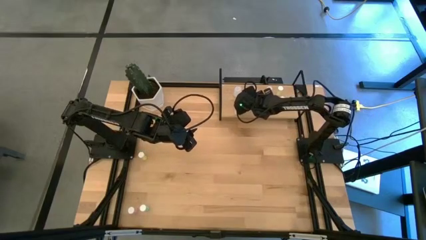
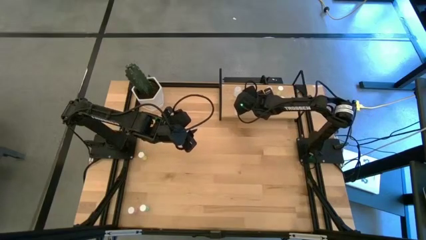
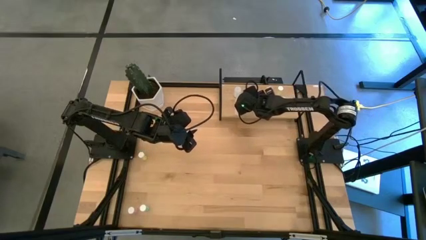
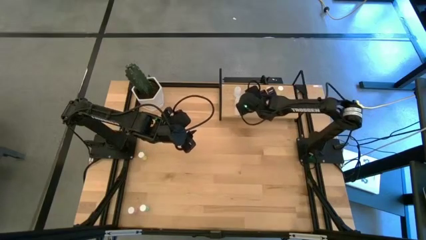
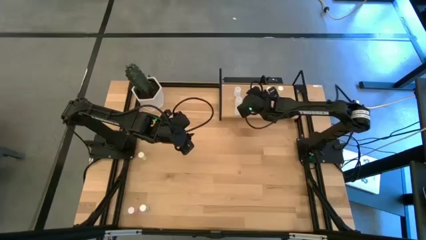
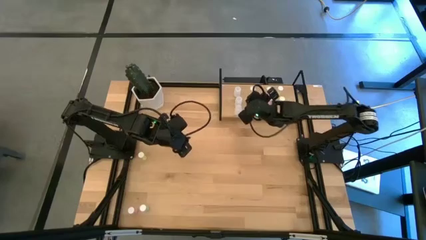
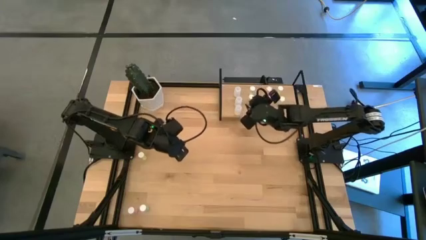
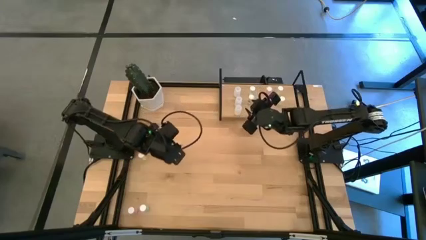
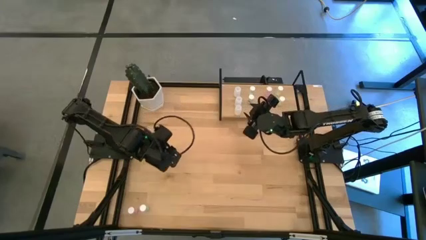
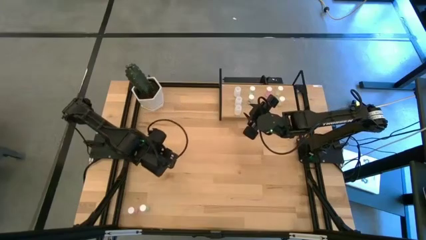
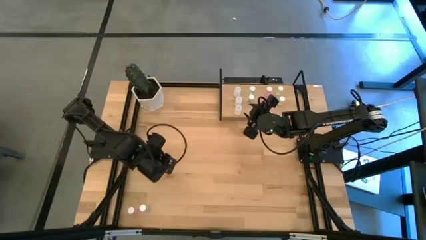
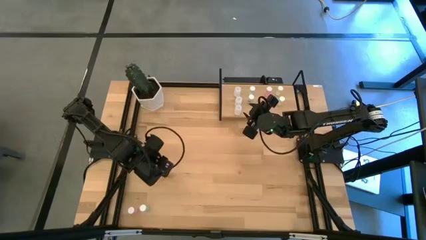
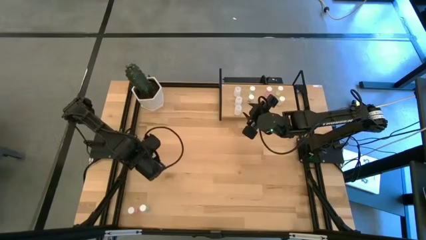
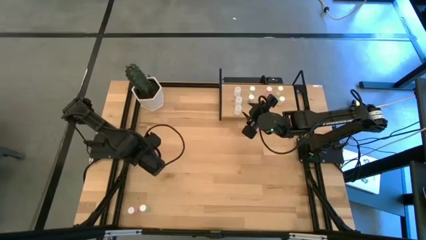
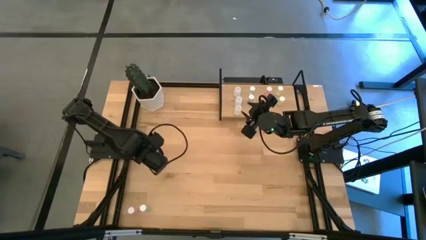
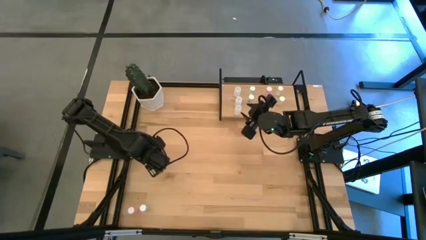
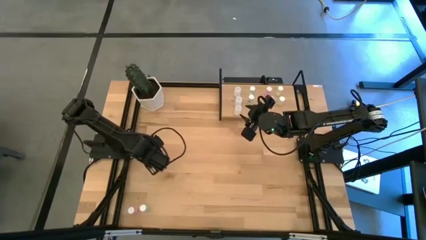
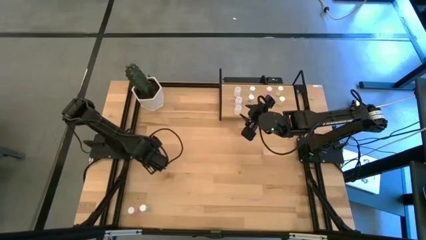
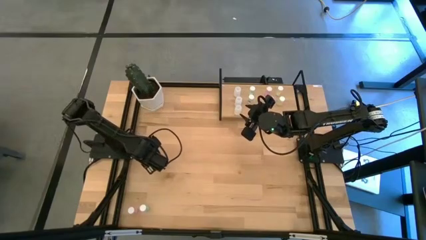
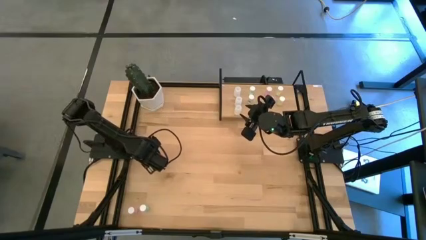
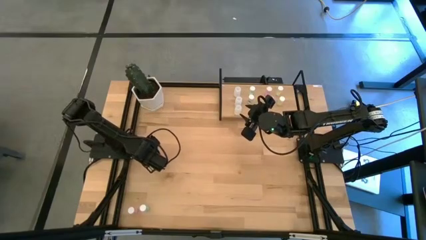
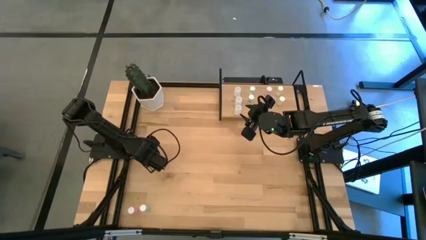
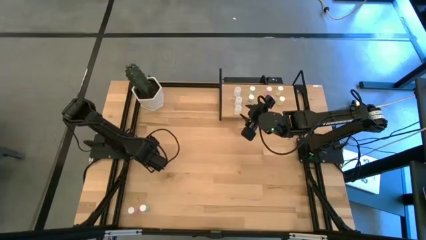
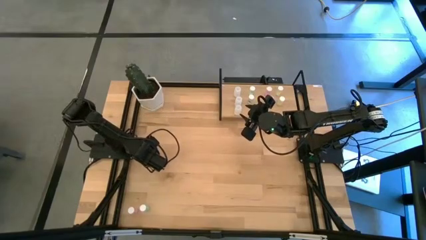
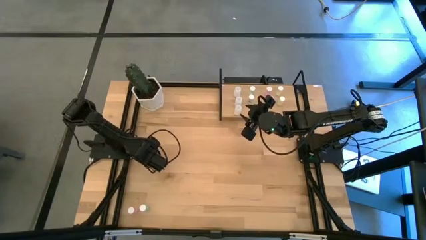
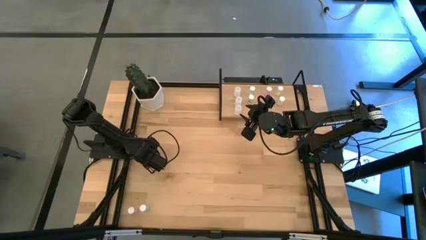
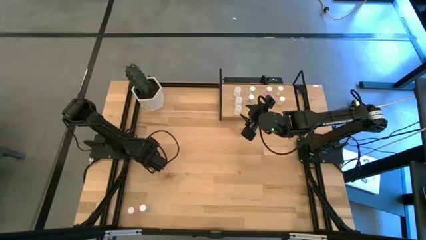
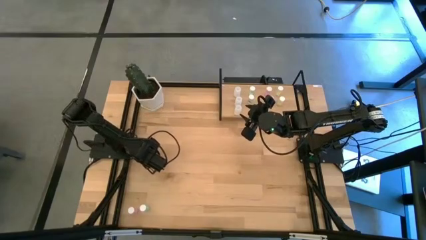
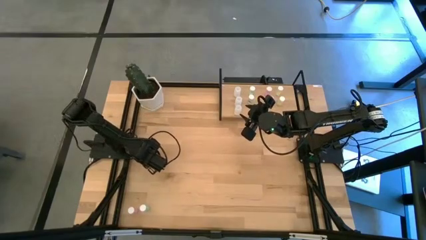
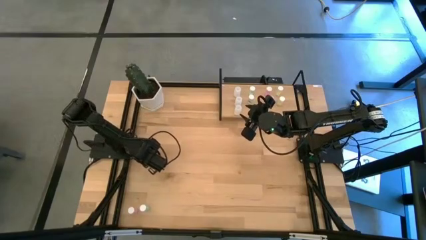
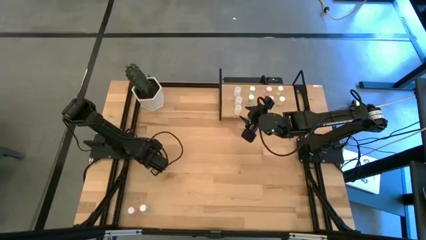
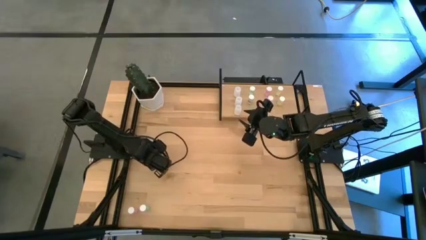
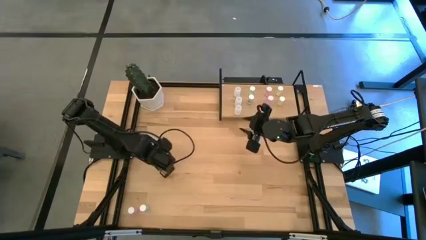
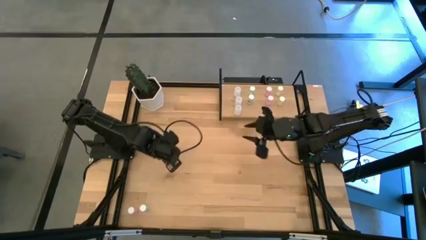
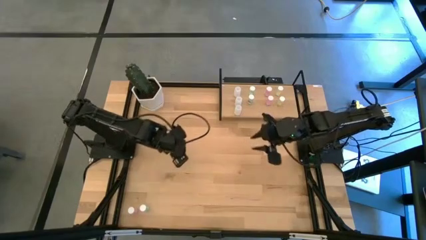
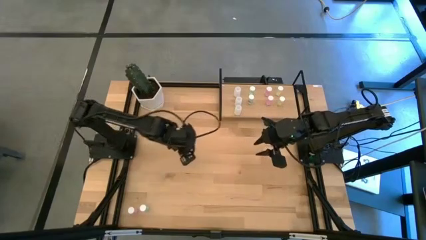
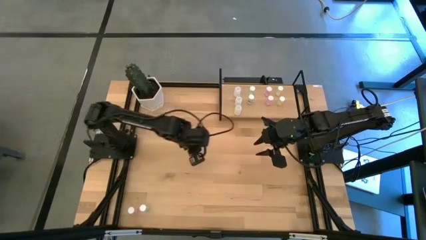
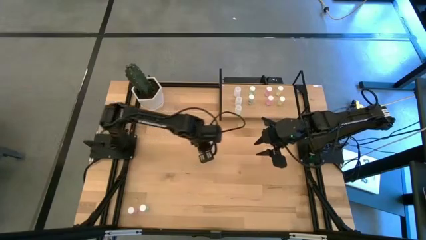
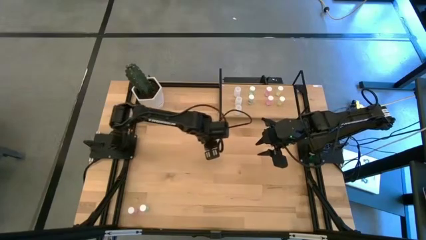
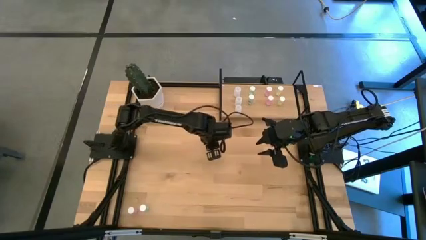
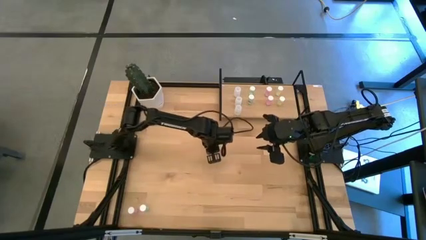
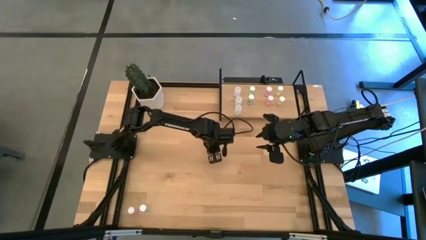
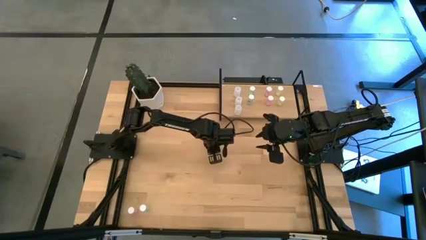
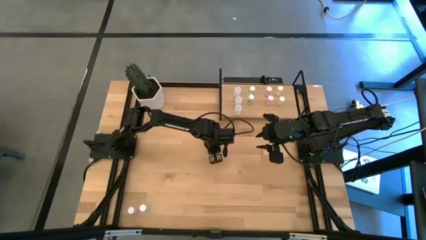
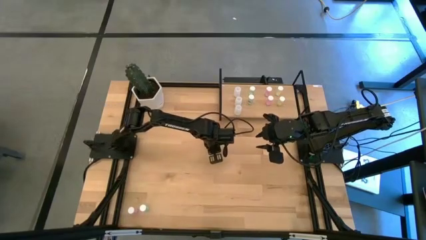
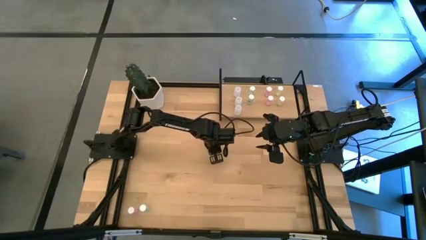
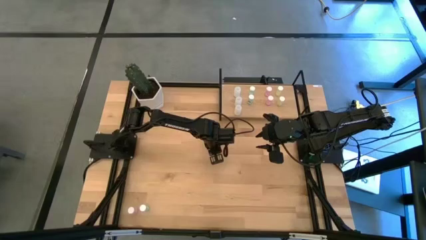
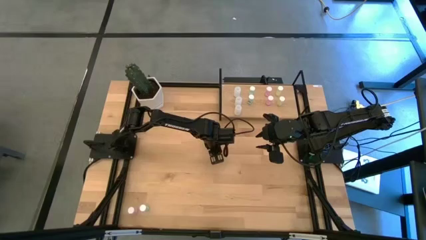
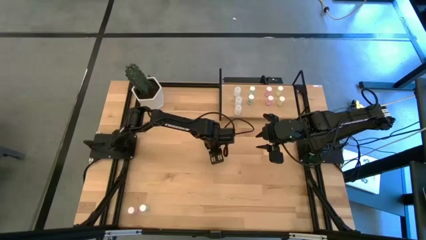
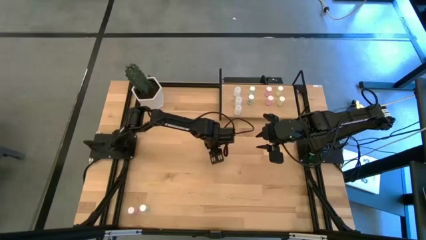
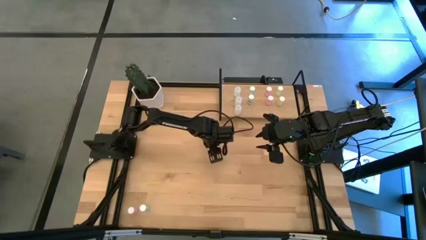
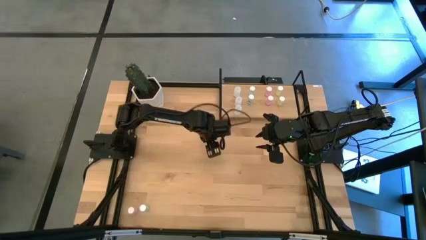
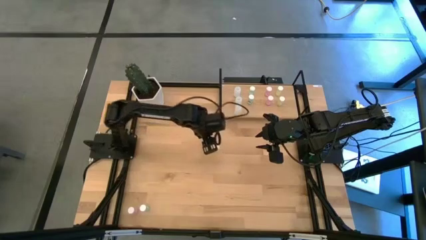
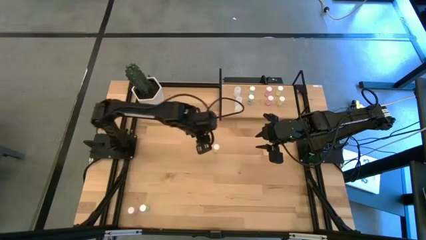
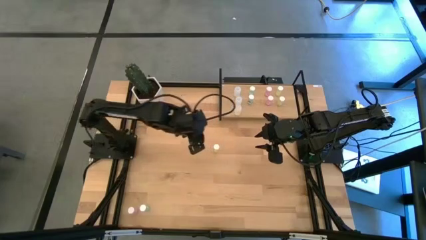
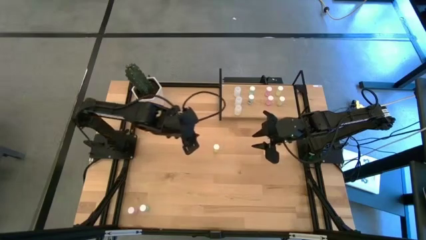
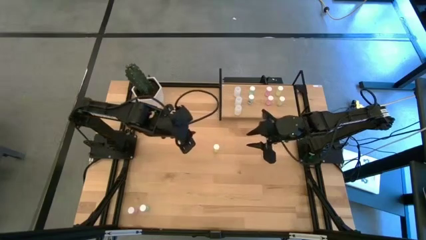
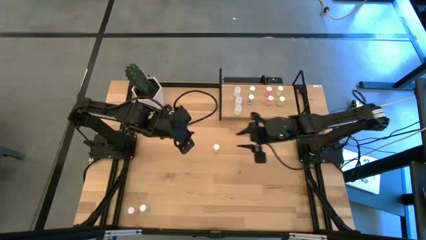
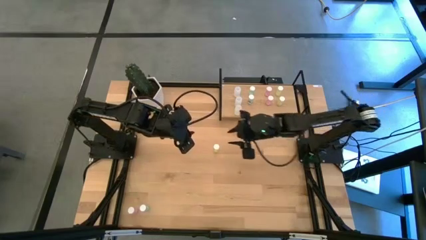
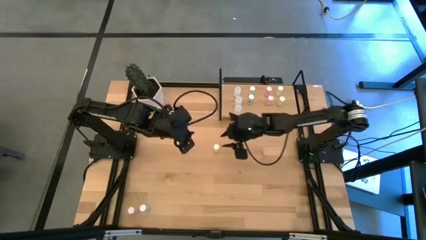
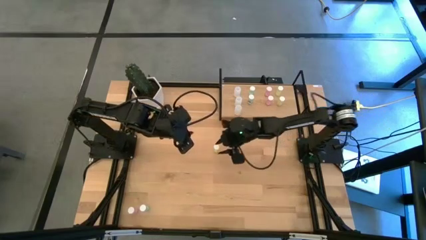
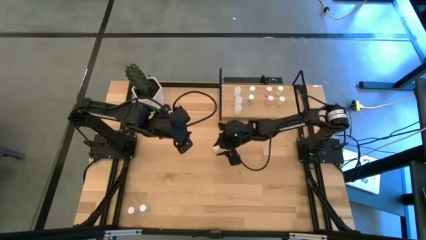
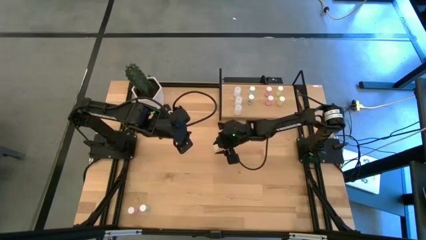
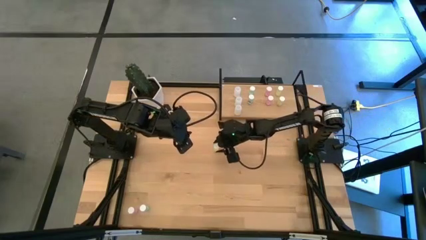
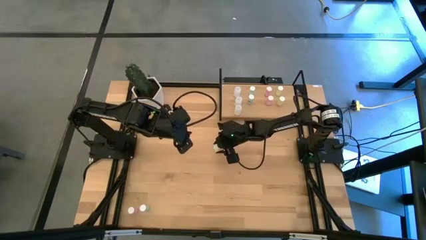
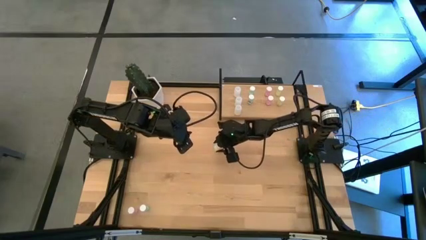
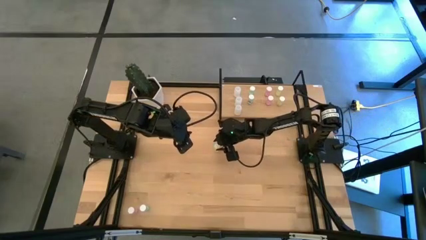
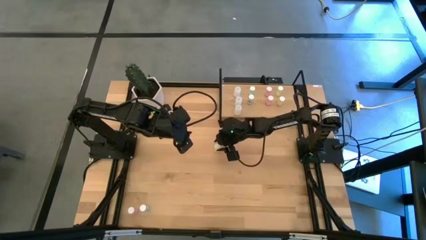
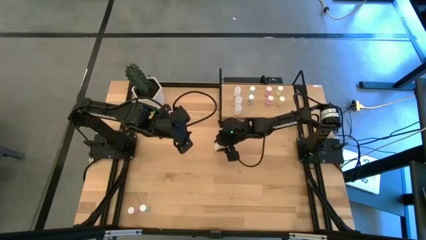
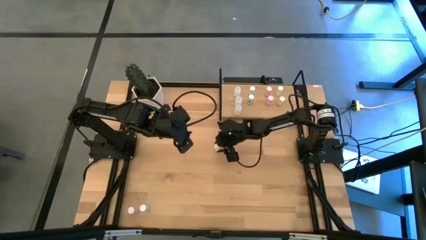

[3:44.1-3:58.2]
Task: Pick and place medicine bottles onto shelf by color
Put the yellow pill bottle on the shelf aligned with the other yellow pill bottles

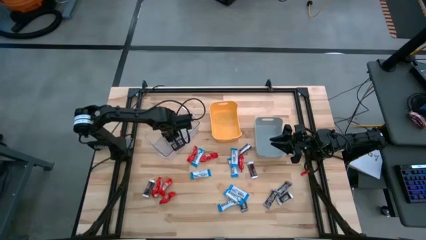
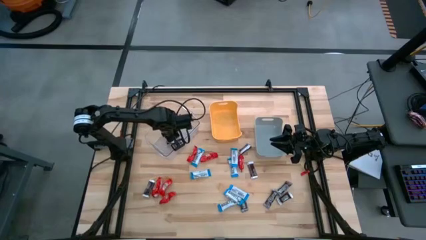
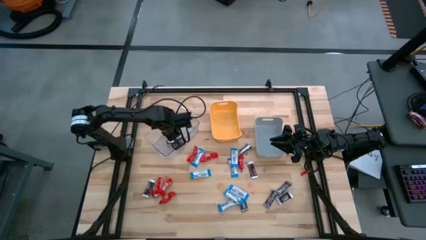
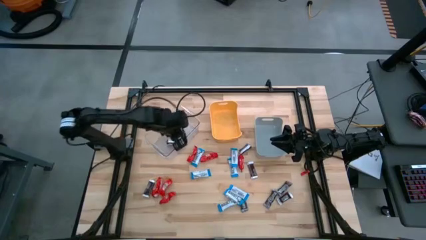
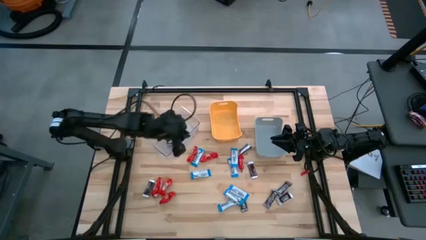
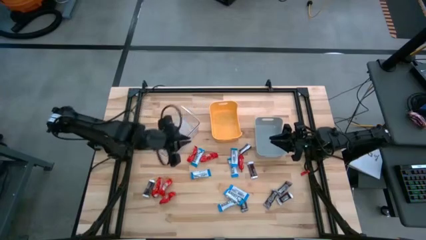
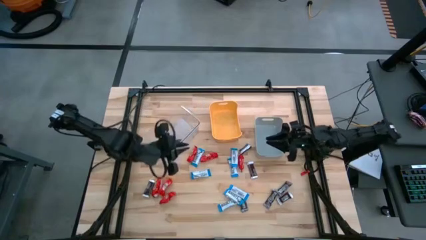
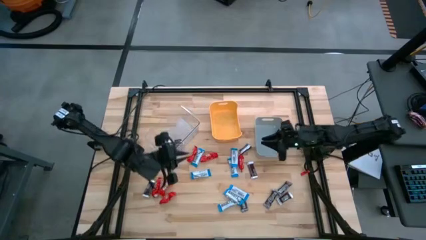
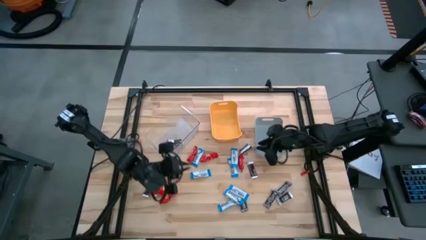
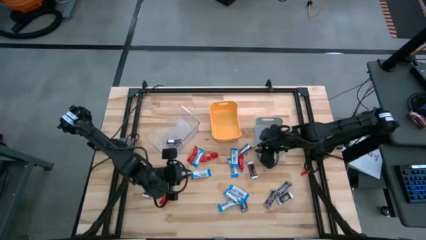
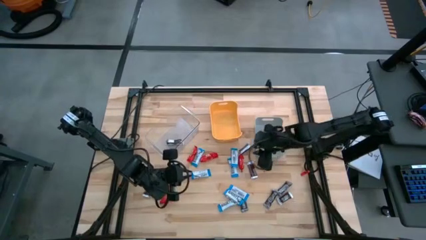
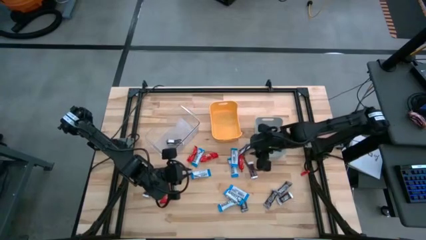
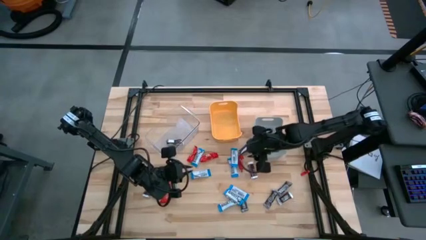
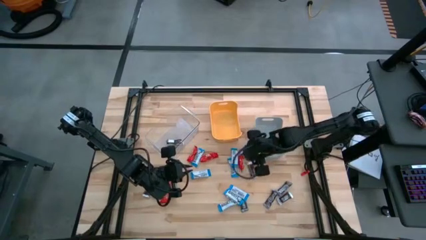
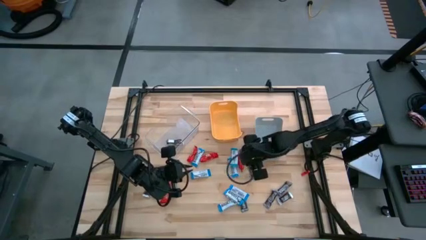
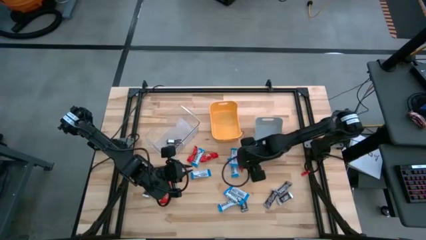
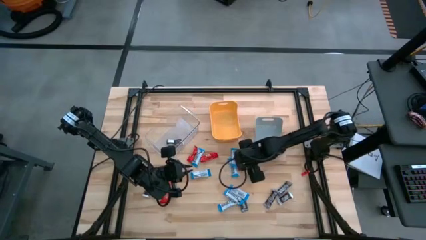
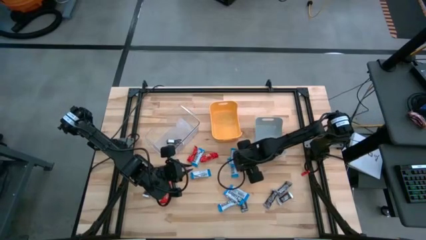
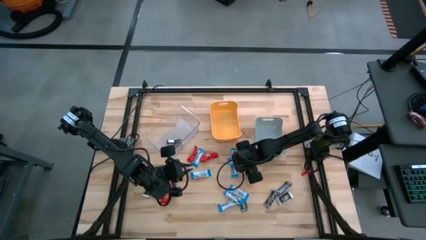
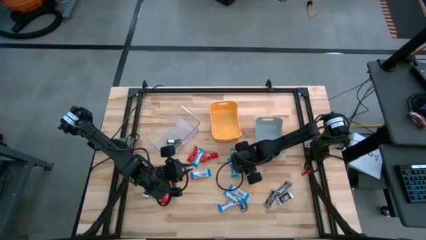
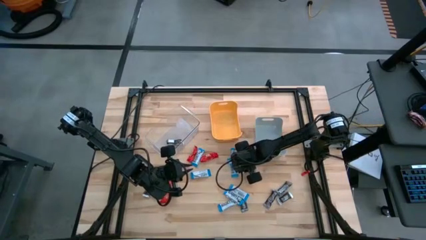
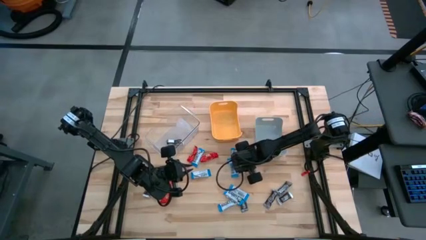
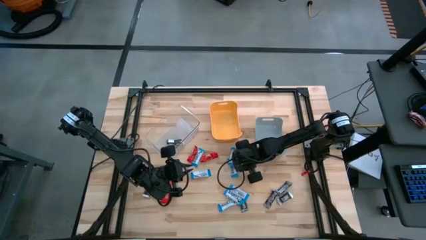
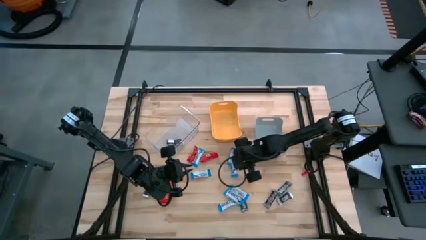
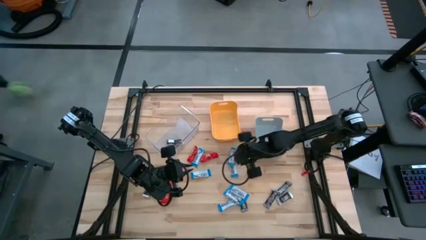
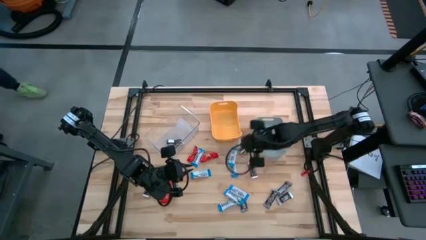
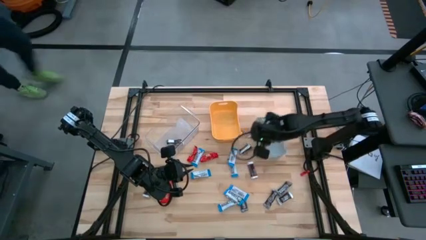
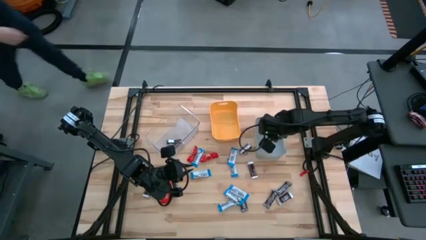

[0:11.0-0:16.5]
Task: Organize candy in baskets
Put the red chocolate into the gray bin
